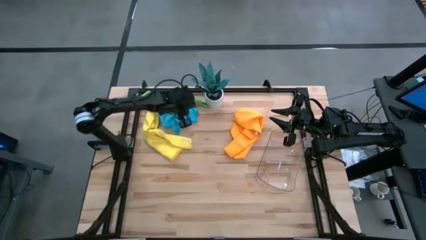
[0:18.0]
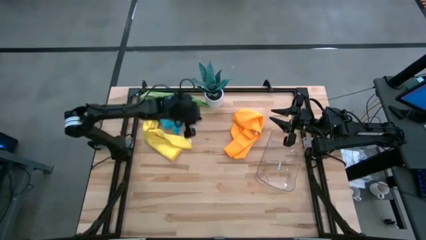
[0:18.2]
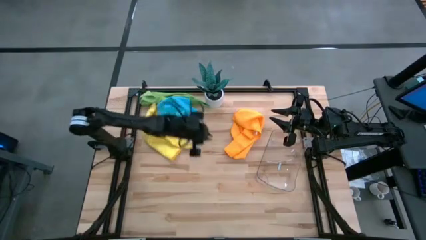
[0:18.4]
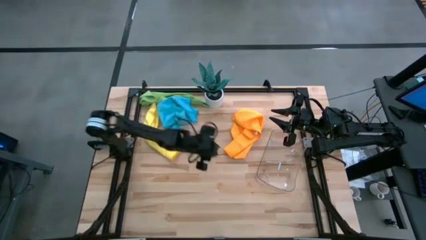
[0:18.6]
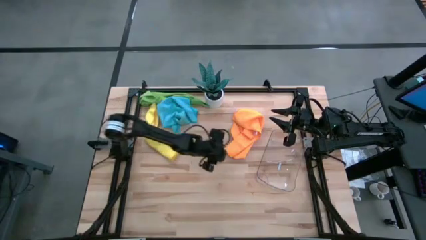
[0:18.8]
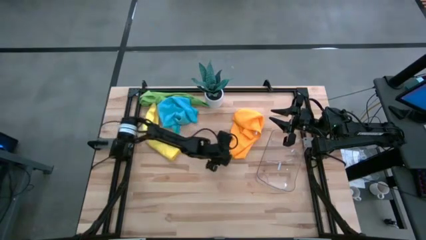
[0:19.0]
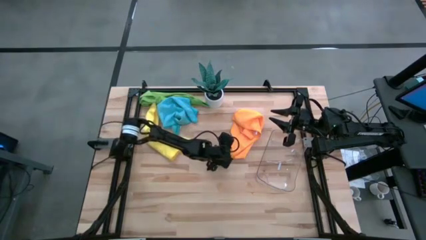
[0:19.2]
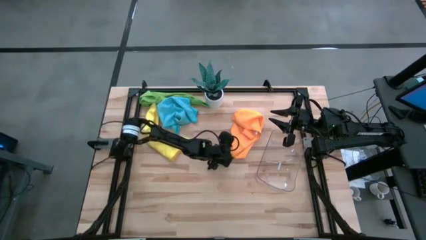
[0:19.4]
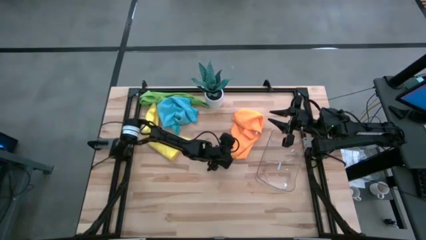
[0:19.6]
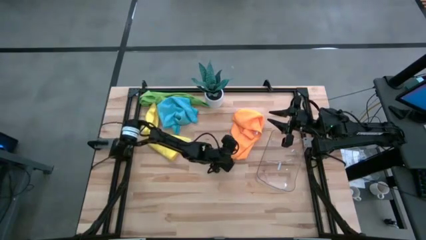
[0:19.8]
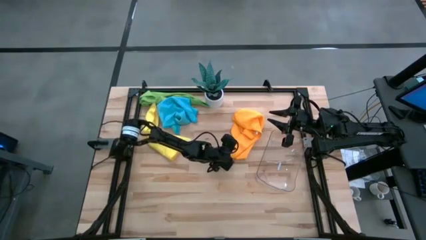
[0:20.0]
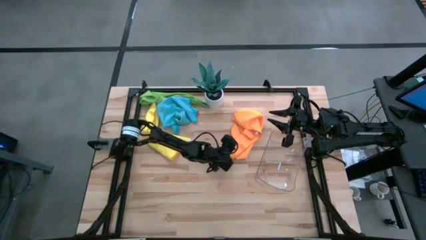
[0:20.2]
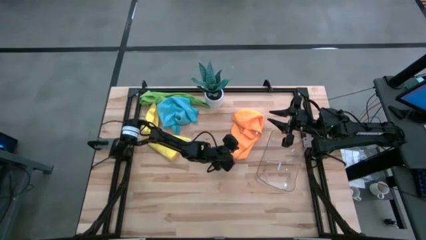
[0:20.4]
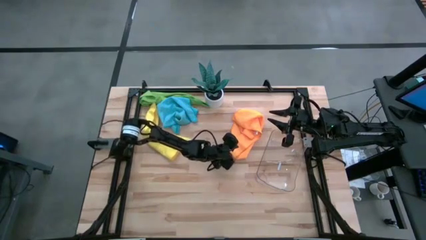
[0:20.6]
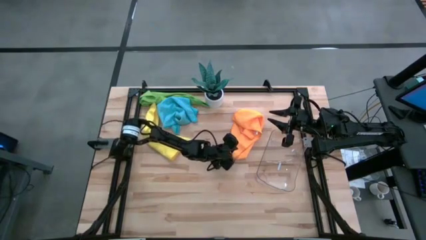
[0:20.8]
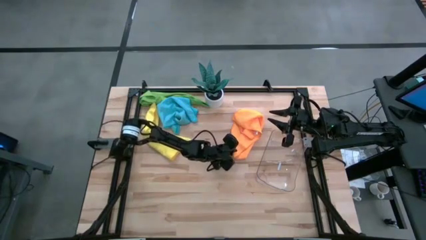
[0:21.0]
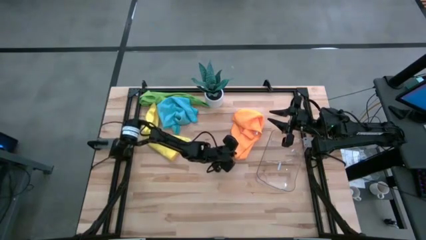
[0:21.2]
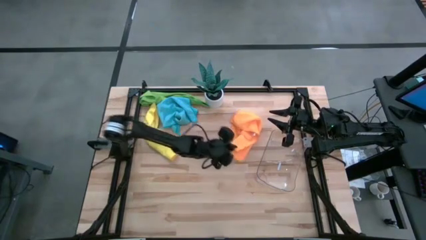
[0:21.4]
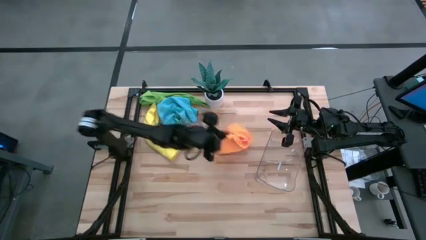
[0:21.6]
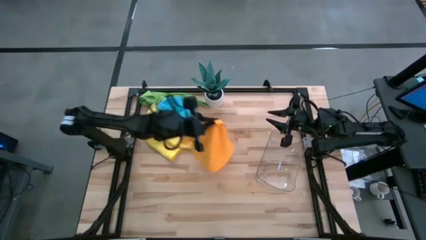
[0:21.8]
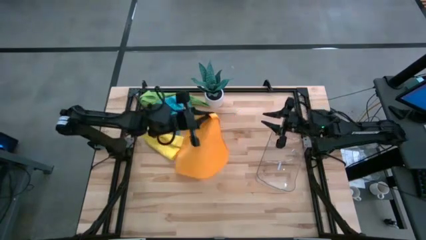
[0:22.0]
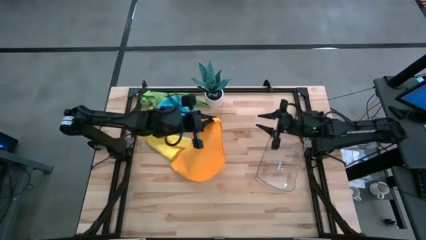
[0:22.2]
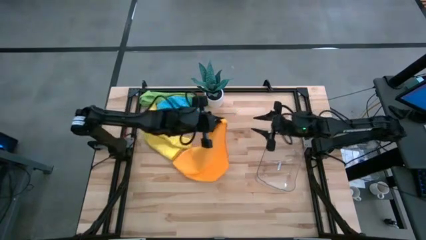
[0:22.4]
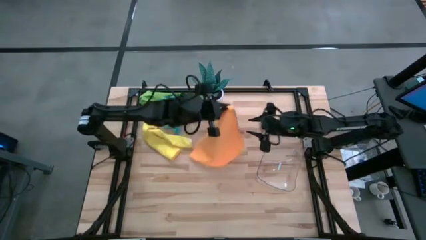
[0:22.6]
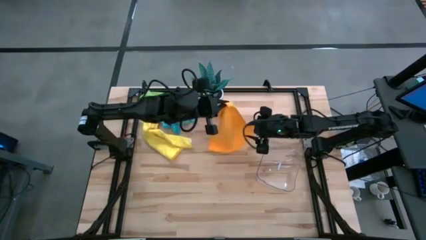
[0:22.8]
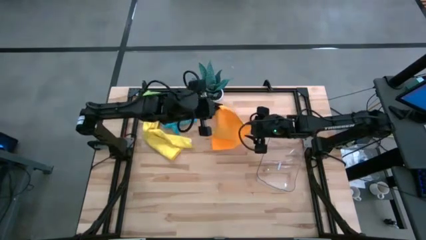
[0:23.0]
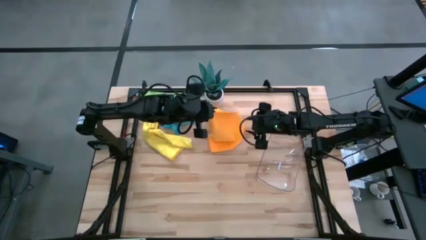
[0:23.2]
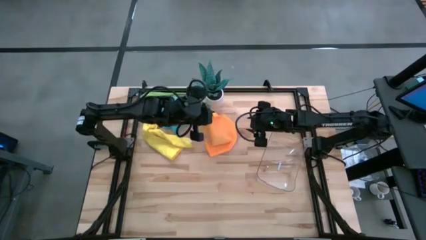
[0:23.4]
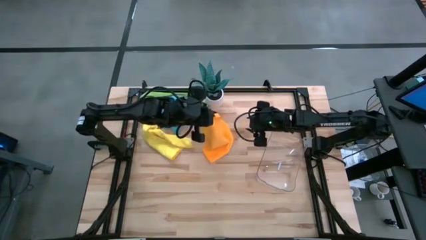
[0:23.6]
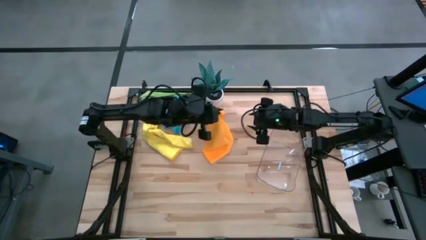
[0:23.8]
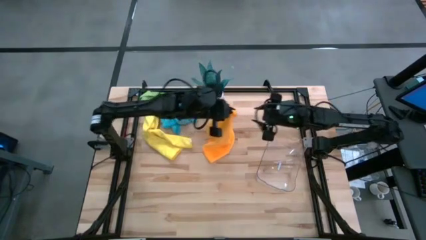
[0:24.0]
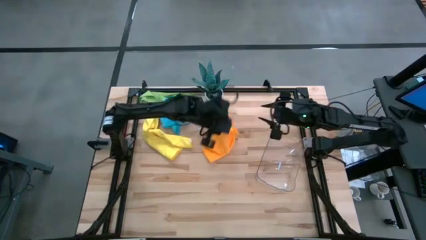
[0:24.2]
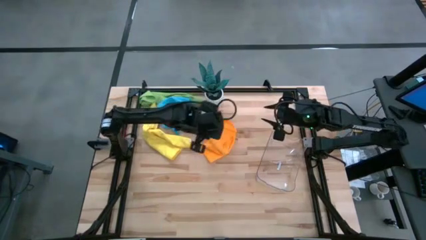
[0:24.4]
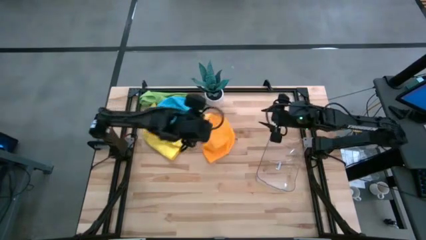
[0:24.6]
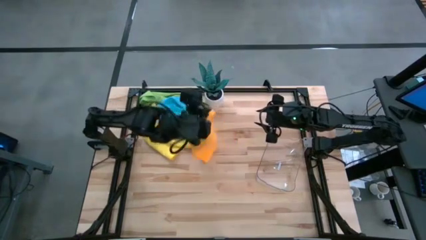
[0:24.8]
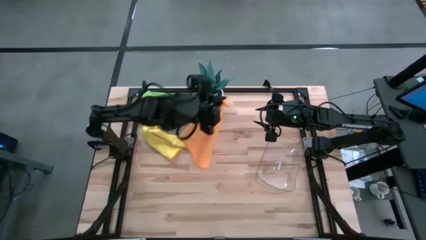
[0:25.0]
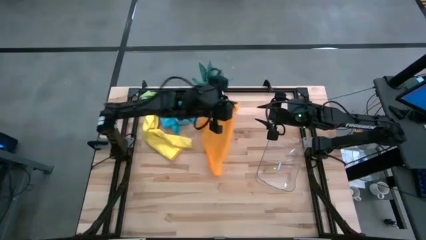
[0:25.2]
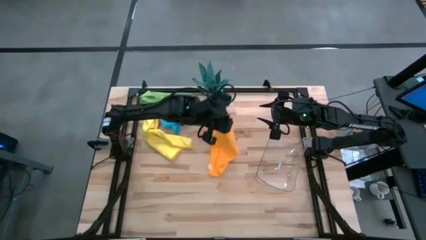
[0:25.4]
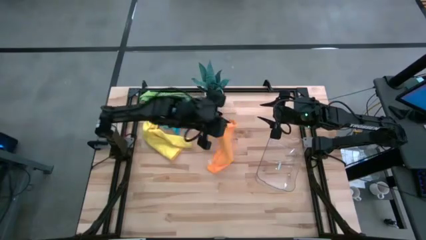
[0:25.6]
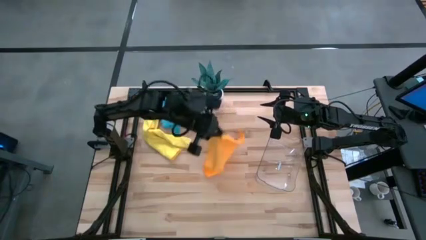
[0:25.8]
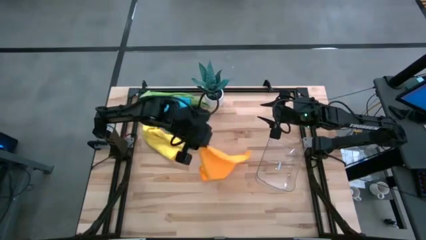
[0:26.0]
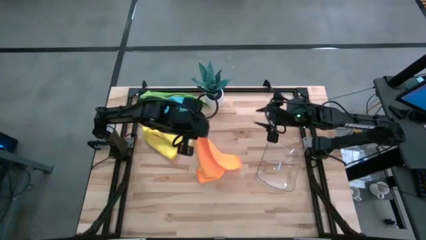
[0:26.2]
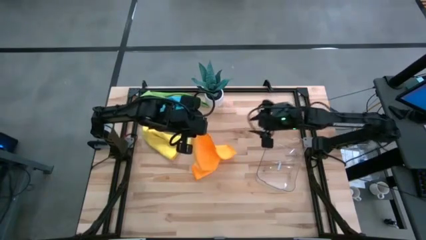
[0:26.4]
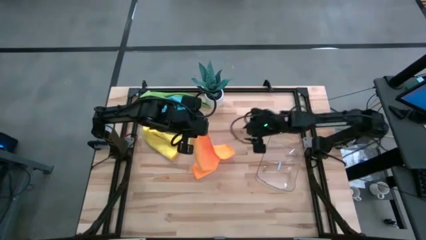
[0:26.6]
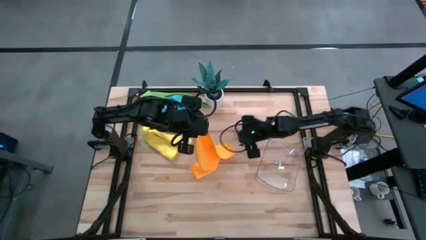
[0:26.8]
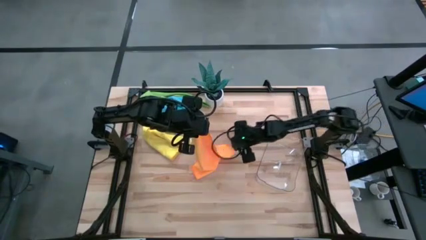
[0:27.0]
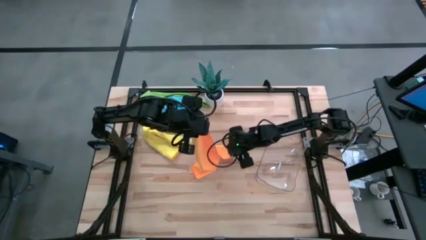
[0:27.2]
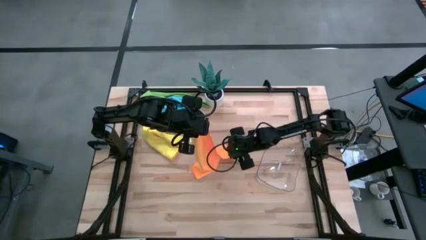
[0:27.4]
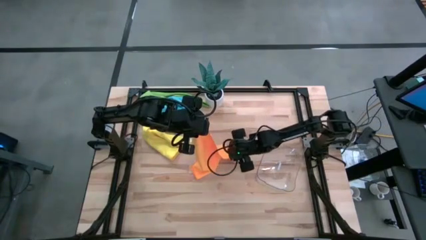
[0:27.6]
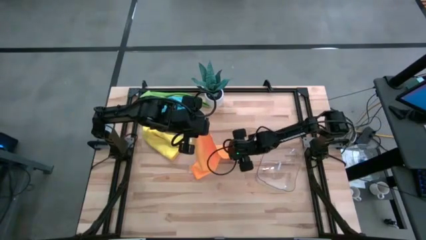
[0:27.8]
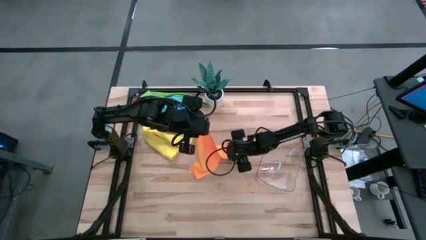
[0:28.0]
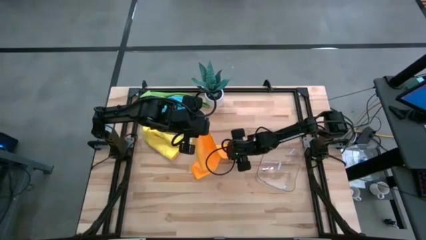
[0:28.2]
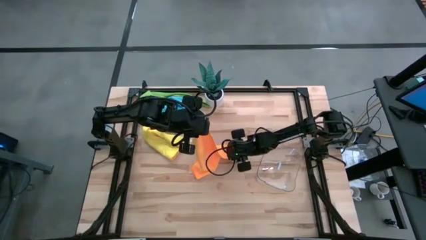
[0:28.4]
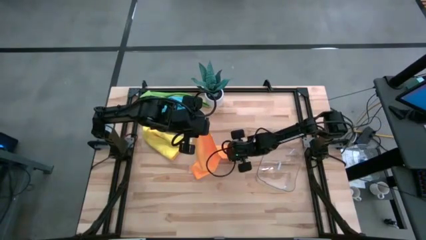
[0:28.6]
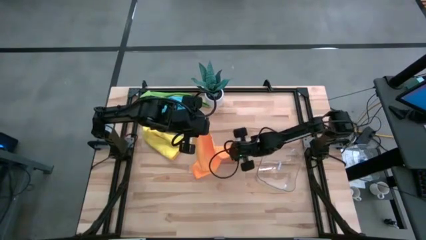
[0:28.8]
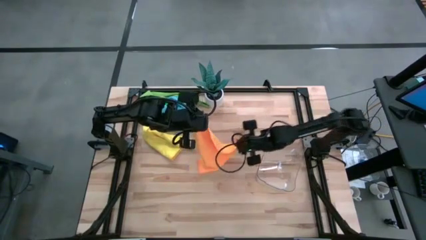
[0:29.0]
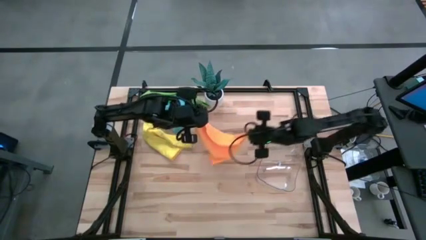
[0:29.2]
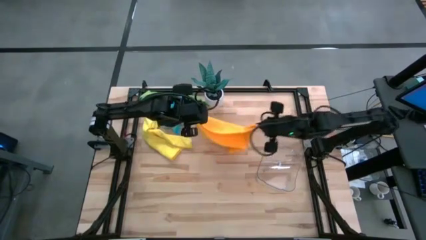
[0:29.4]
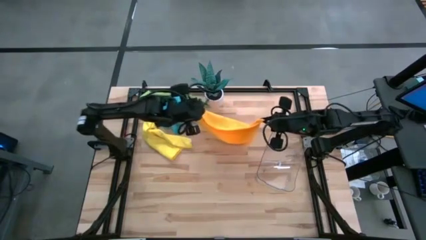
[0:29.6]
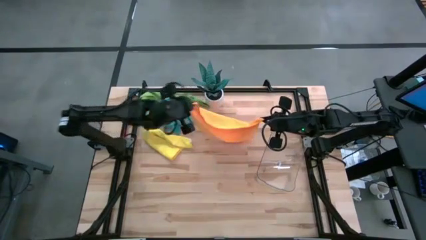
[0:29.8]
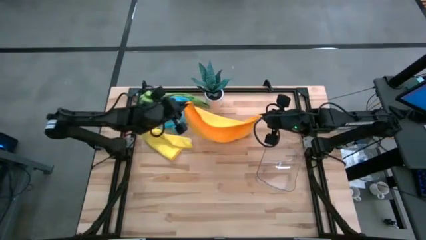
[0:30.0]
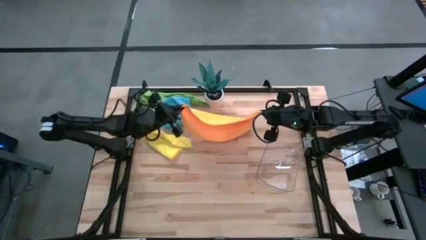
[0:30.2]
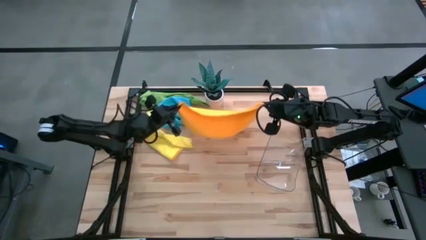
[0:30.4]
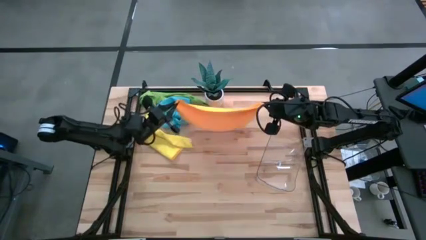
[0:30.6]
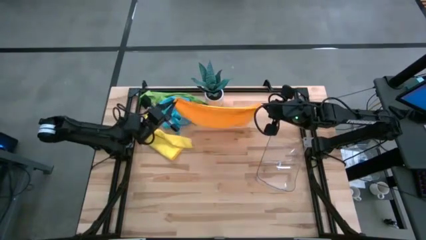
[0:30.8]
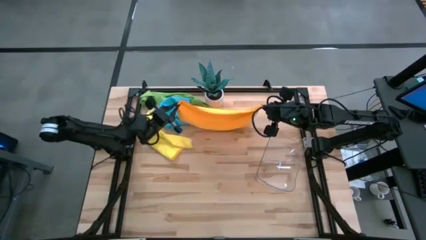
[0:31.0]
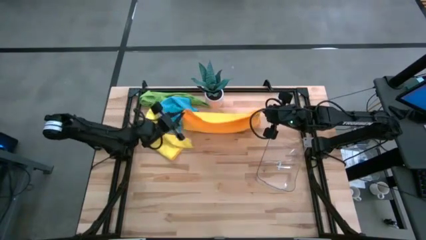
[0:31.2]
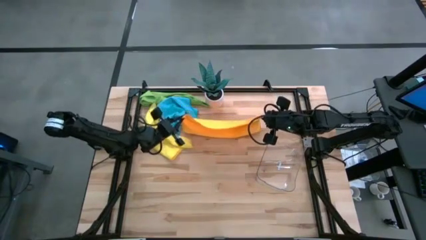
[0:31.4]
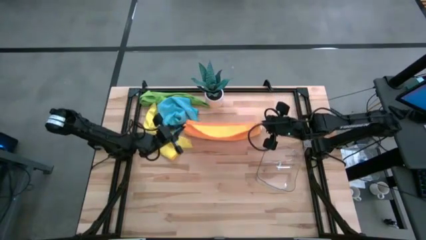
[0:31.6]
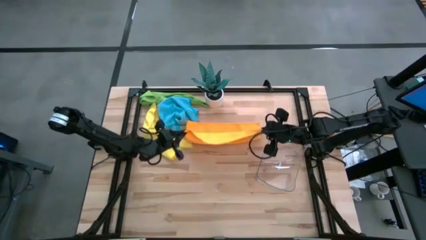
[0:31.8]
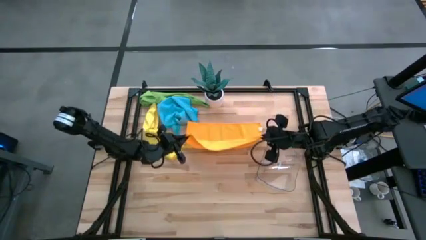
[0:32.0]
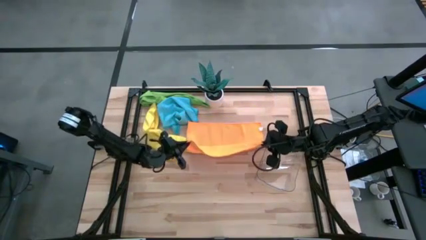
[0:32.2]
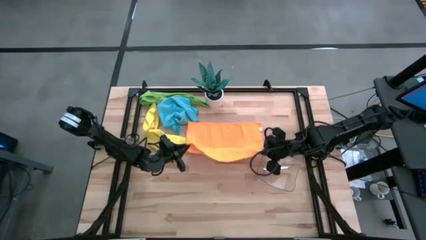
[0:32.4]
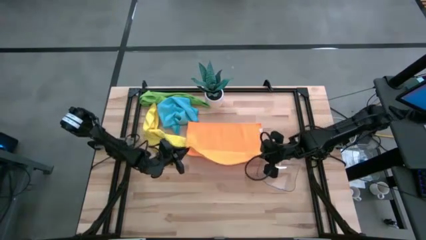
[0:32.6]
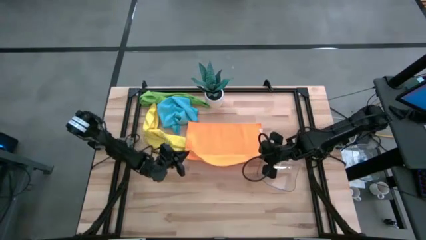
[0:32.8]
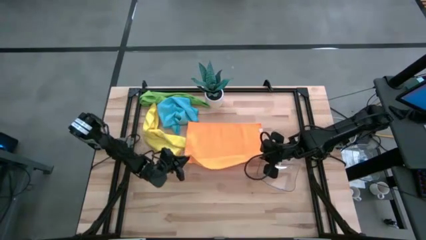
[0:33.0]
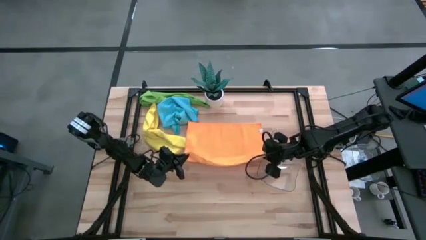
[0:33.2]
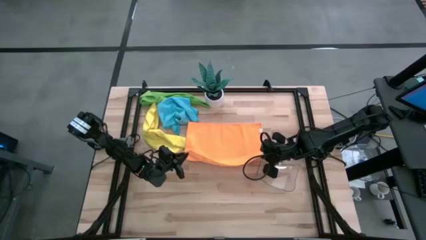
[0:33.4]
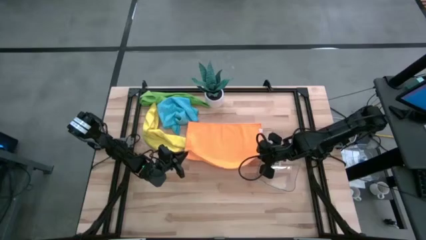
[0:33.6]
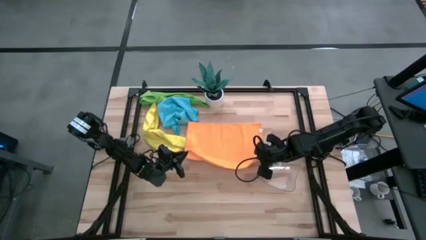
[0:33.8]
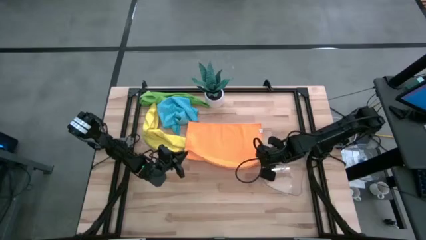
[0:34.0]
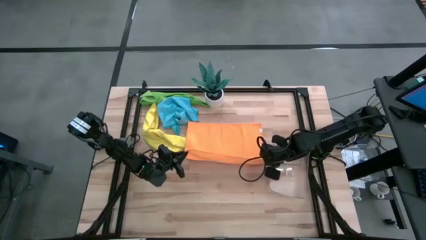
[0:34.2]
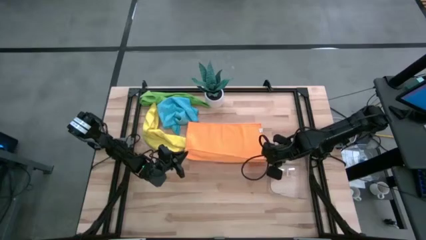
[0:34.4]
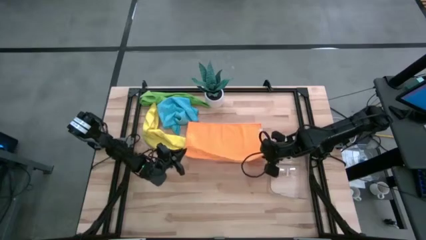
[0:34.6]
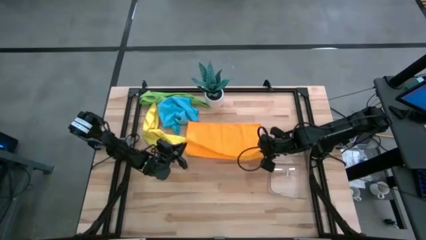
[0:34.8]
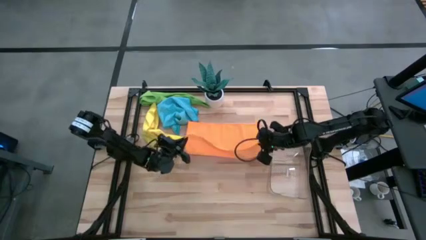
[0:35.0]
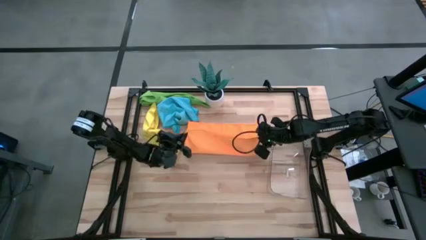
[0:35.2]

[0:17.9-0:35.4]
Task: Roll microfiber towels into tight, uniform cylinder then place into a basket
Fold the orange microfiber cloth
